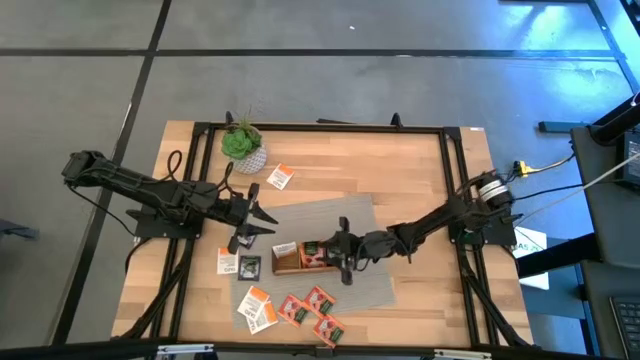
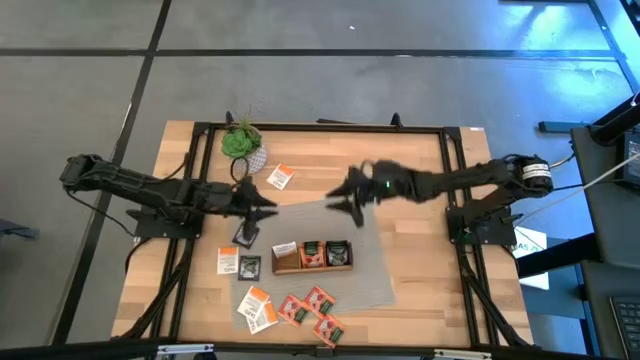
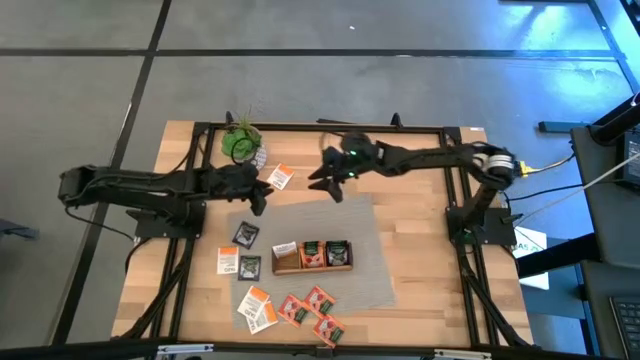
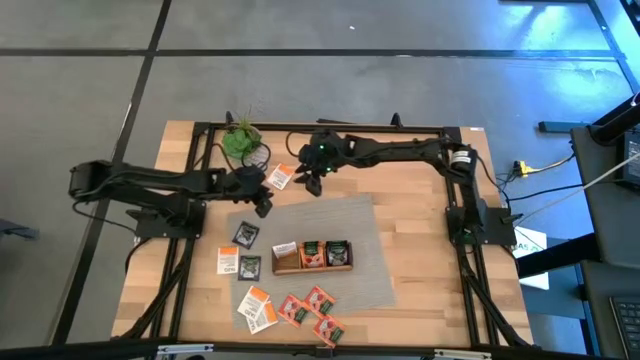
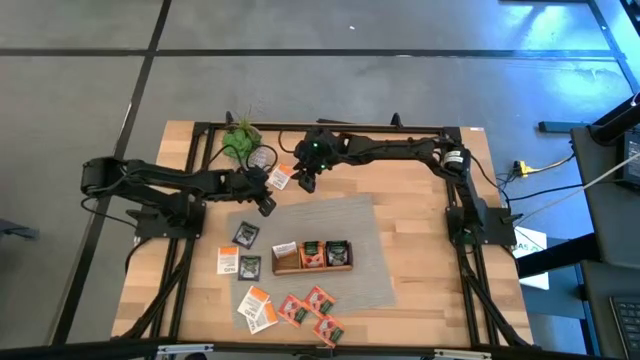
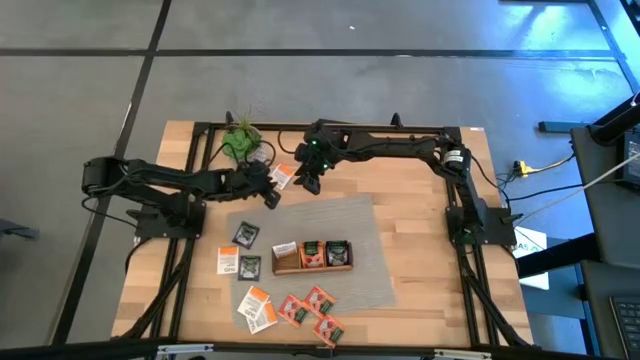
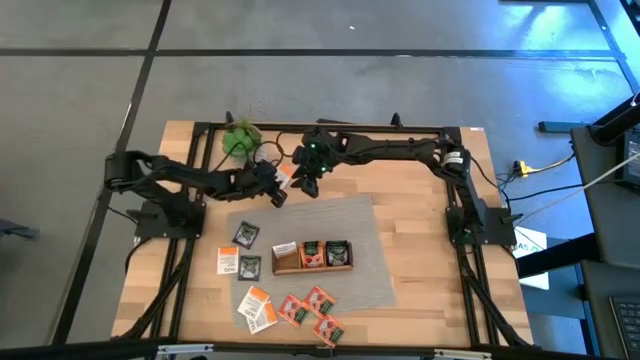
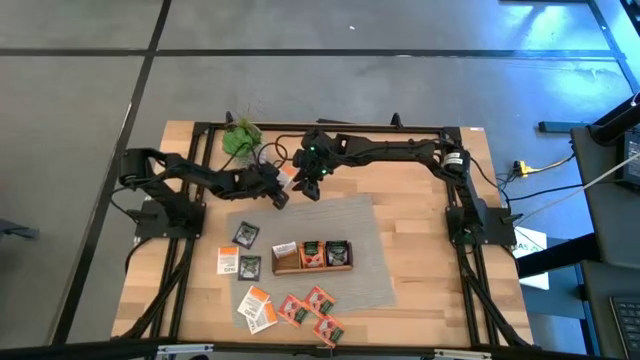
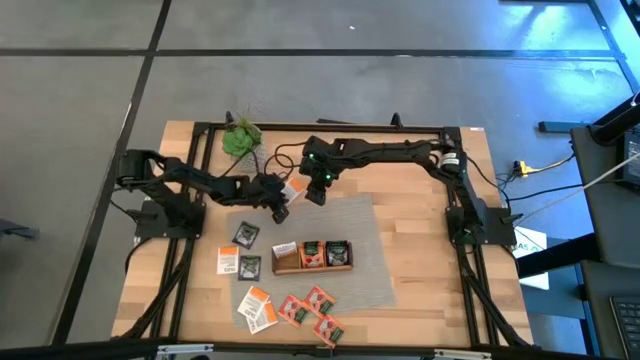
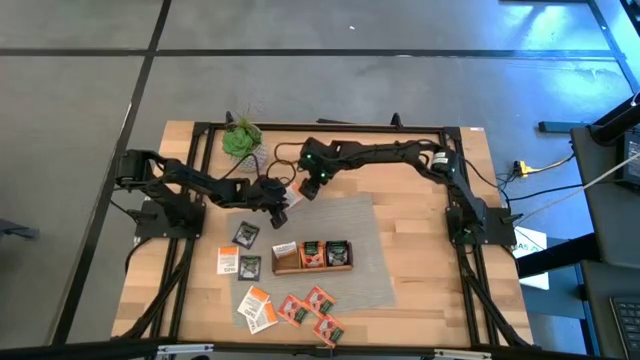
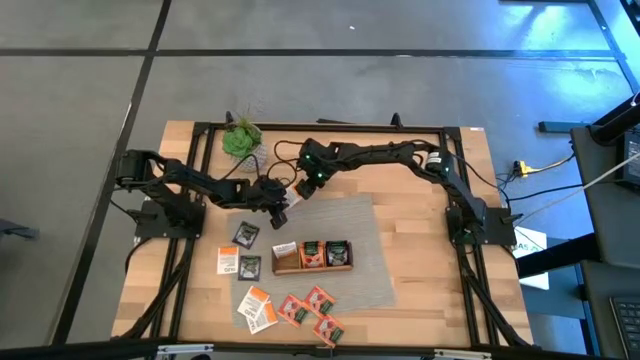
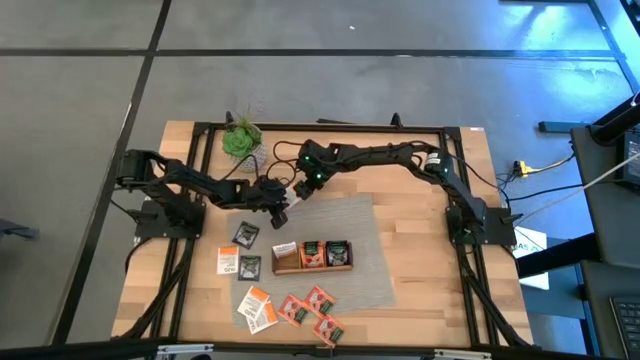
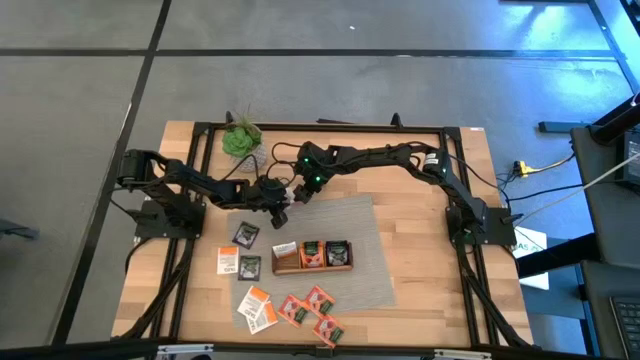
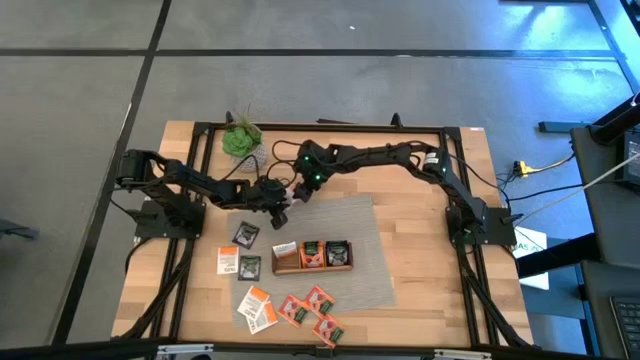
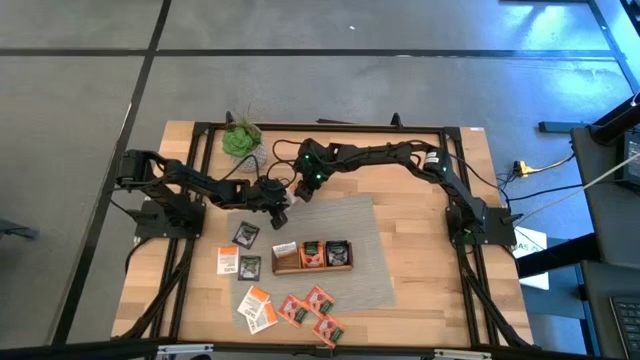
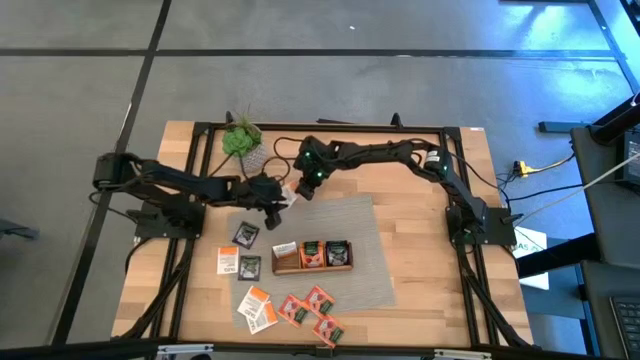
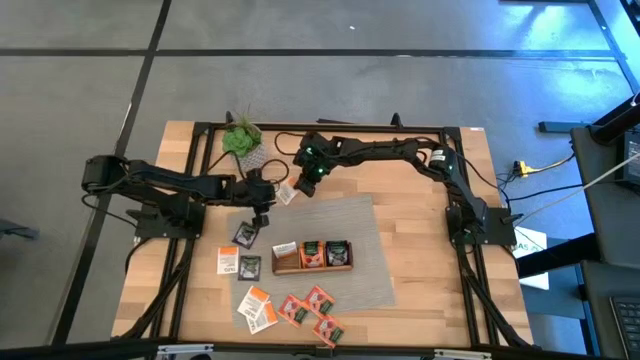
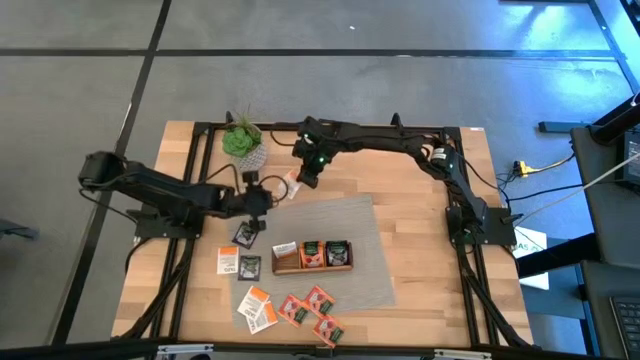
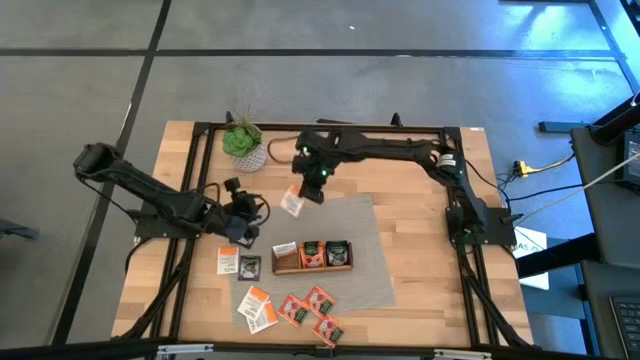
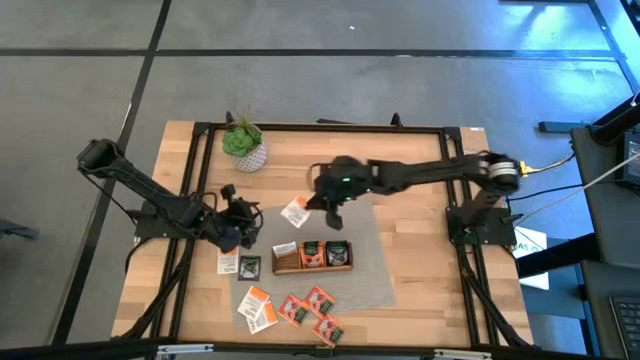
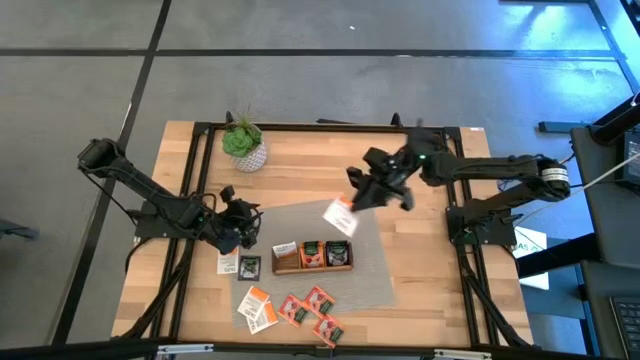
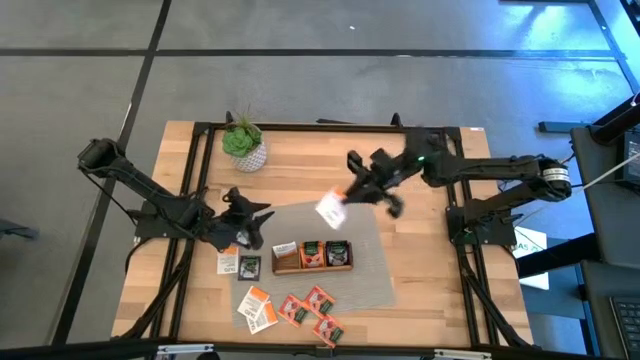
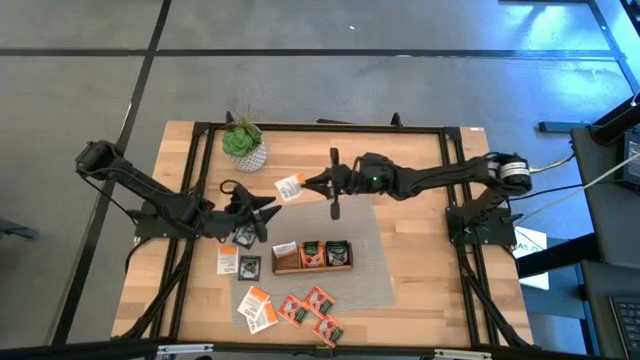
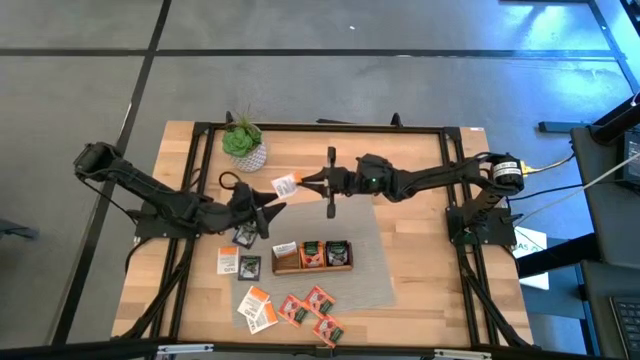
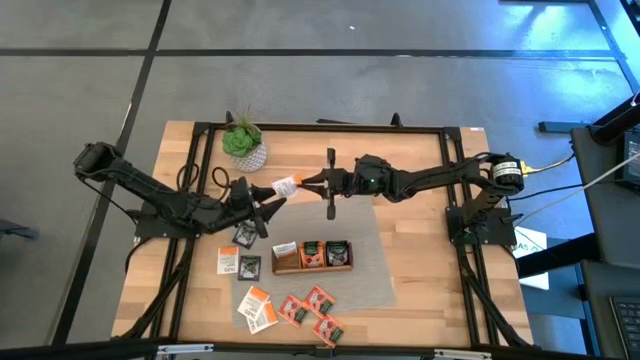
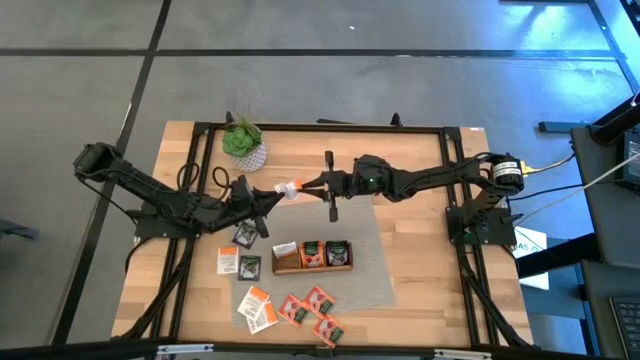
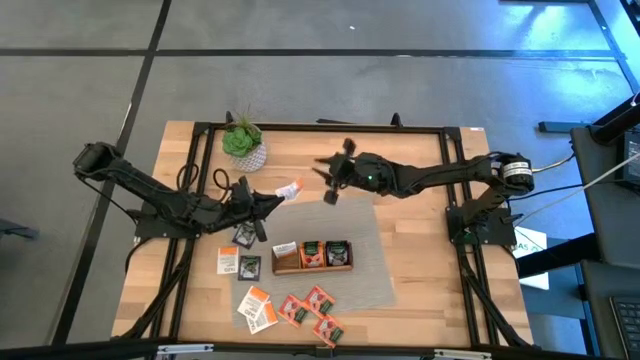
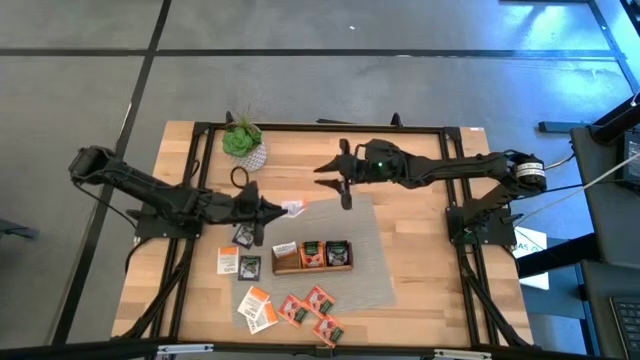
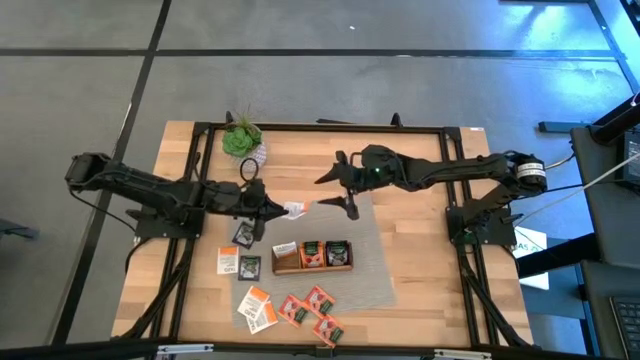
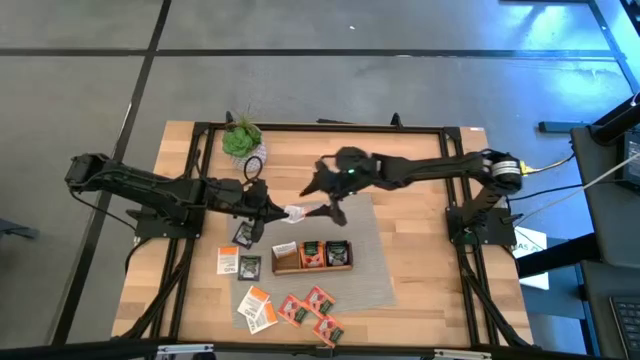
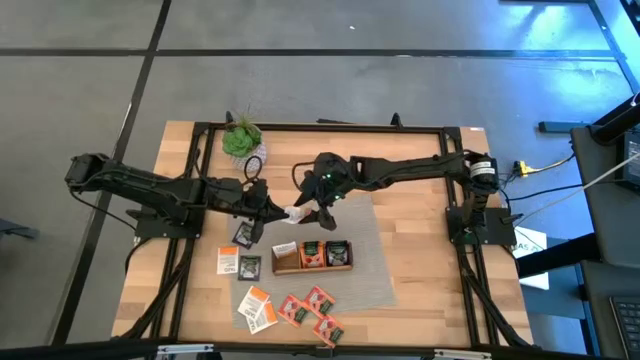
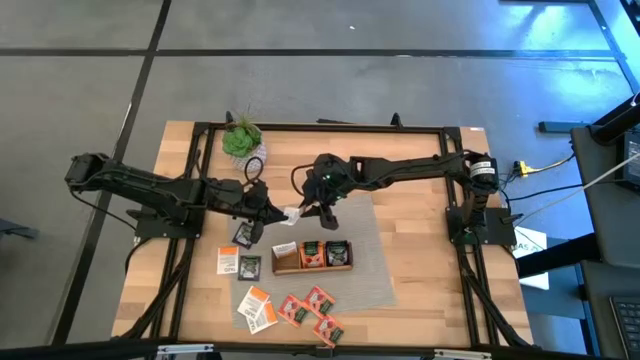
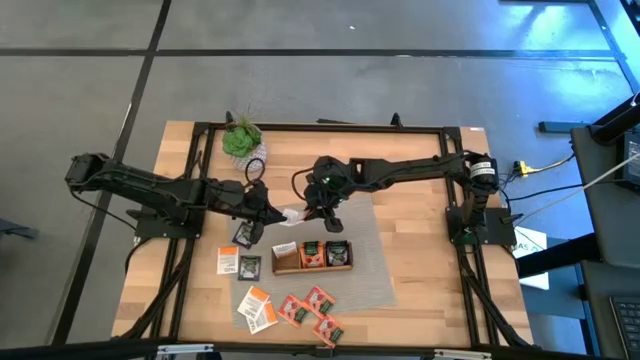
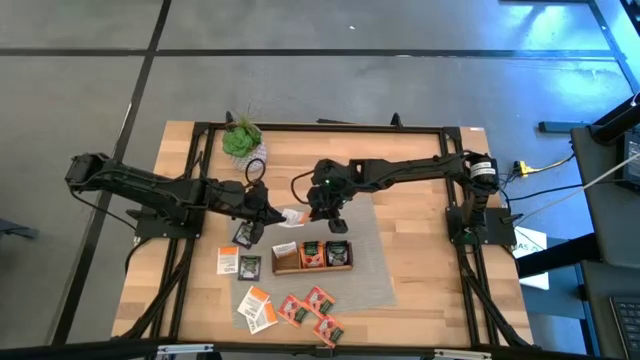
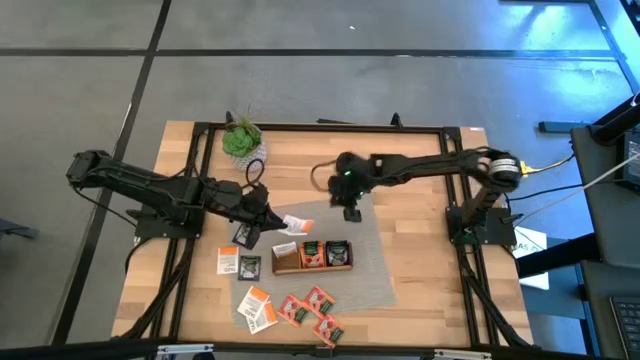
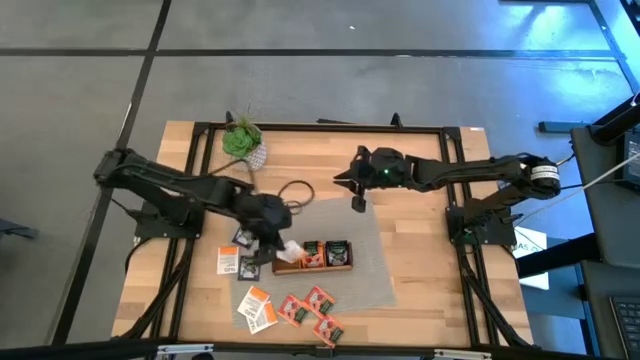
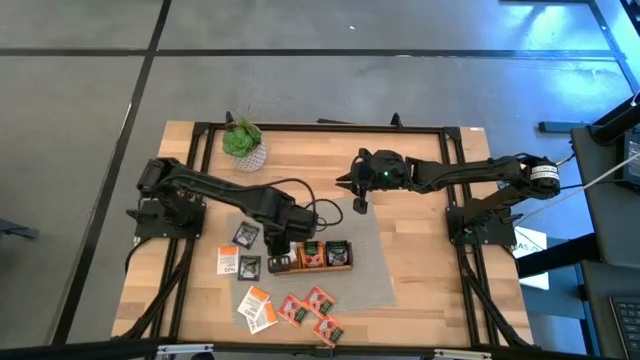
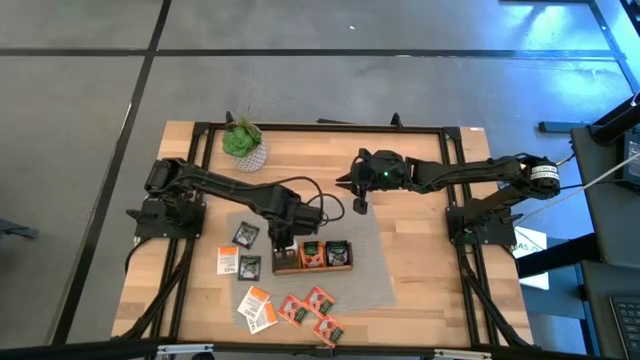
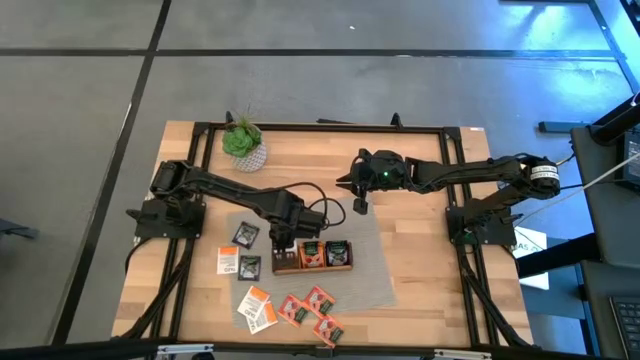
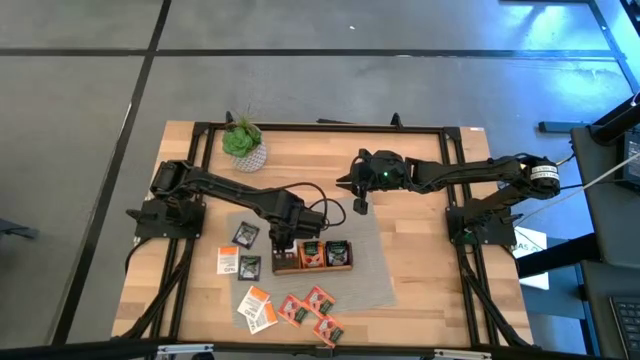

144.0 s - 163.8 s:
Task: Pick & Place Tea
Put the white tea bag into the left section of the wooden organizer

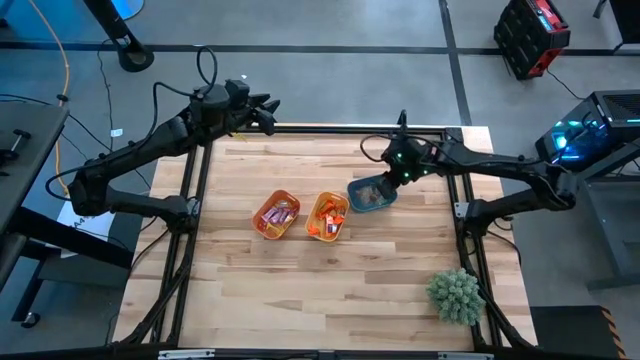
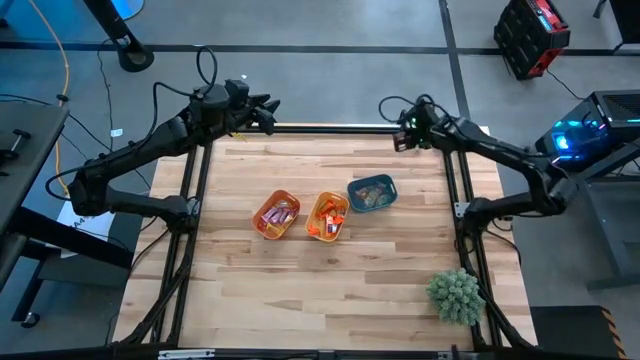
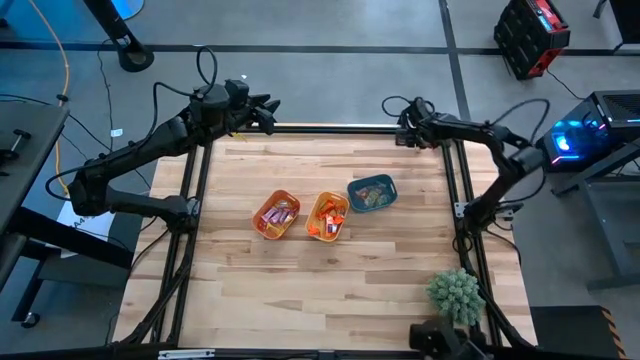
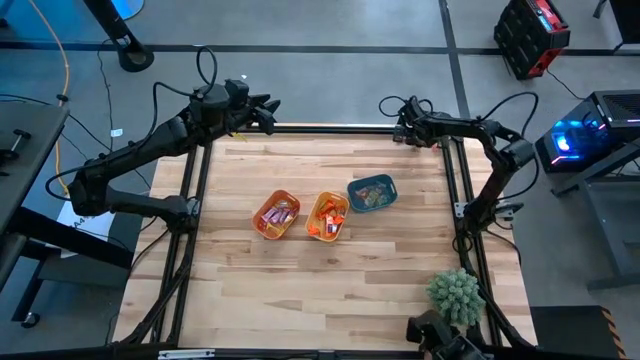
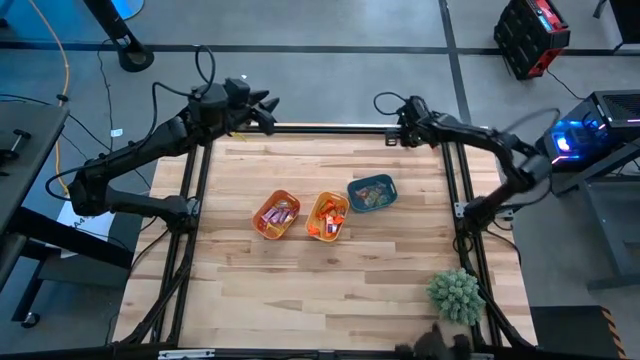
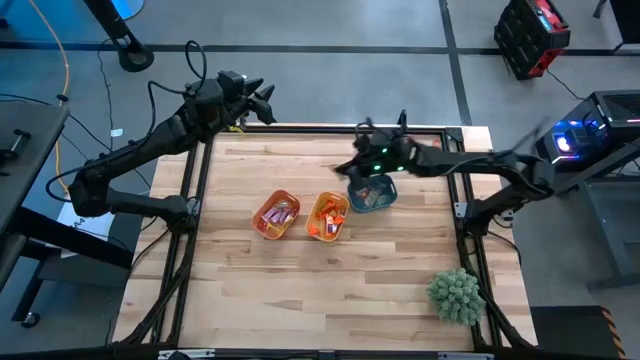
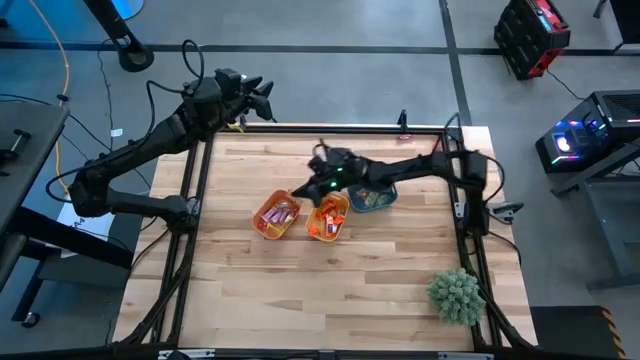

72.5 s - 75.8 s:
Task: Sort candy
Put the yellow candy into the orange bin
